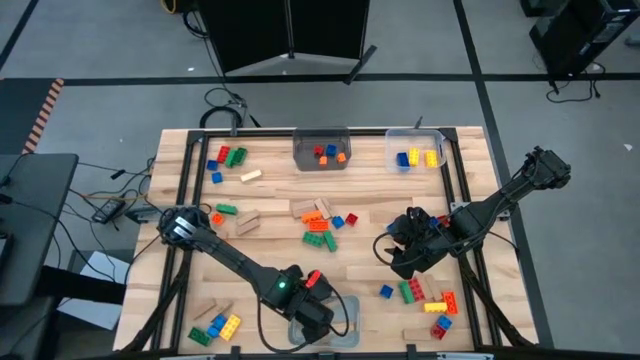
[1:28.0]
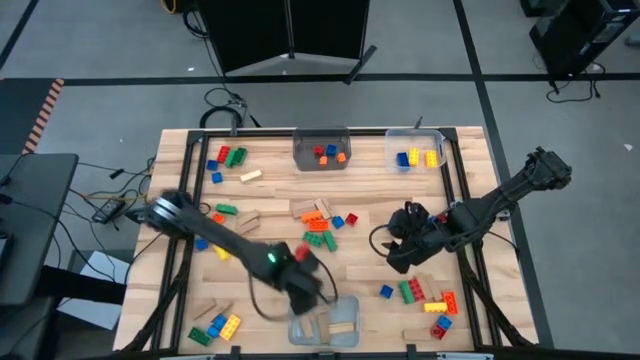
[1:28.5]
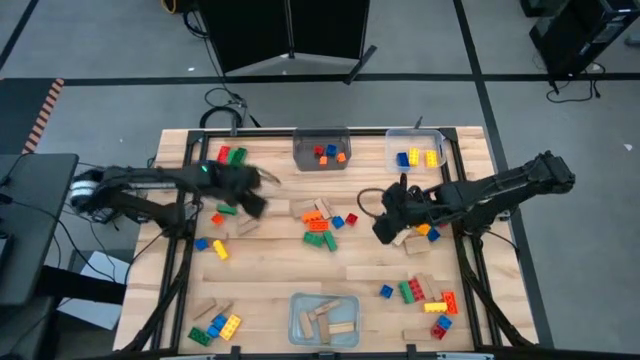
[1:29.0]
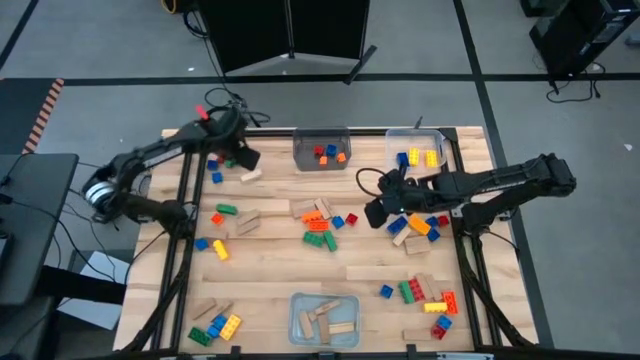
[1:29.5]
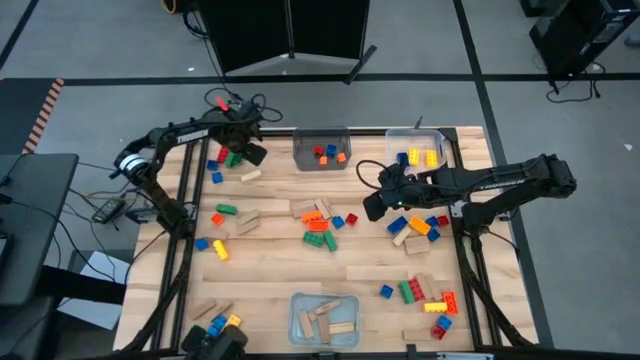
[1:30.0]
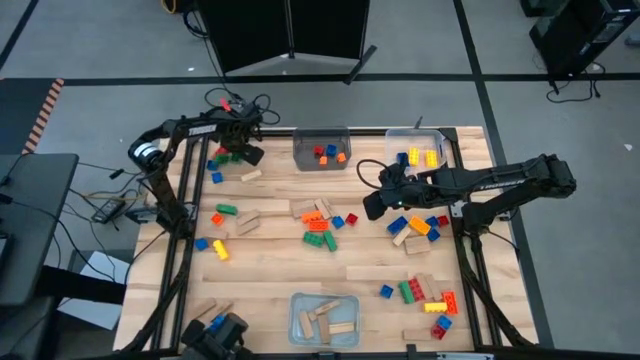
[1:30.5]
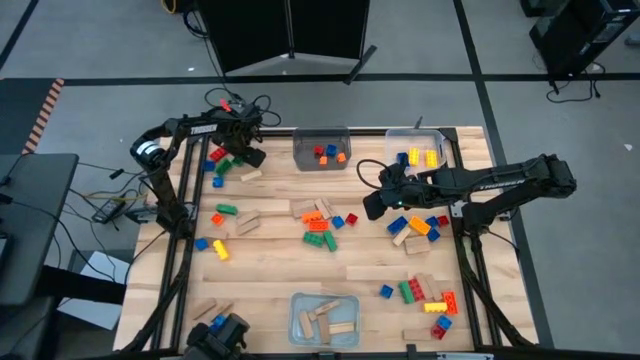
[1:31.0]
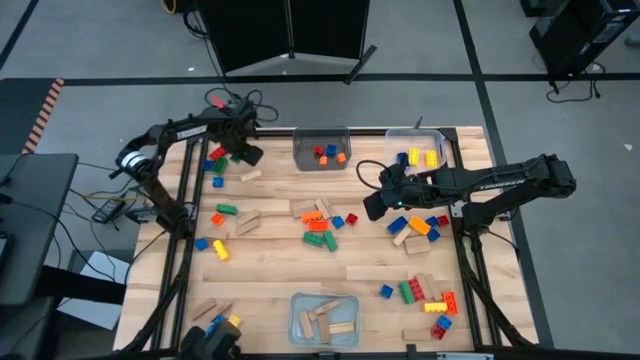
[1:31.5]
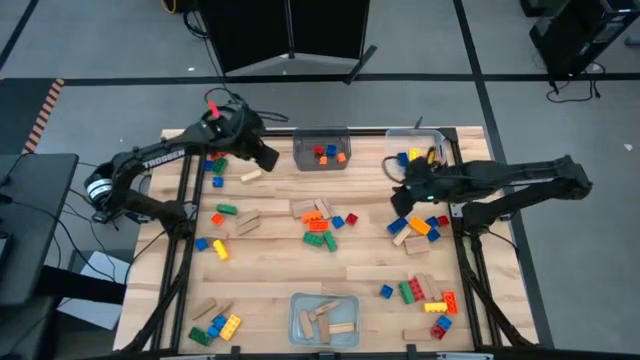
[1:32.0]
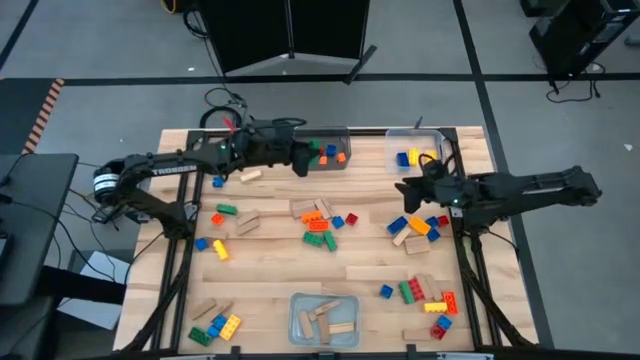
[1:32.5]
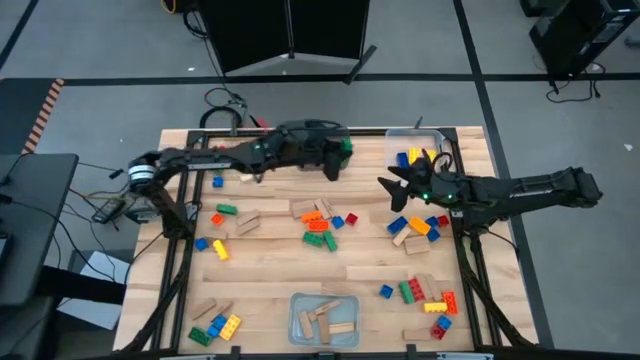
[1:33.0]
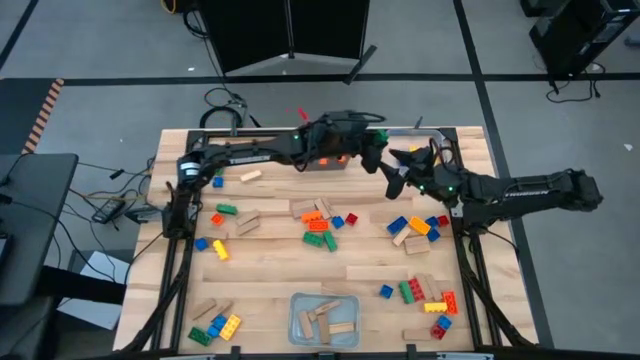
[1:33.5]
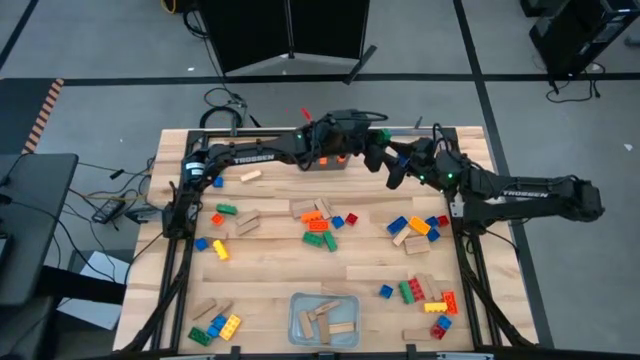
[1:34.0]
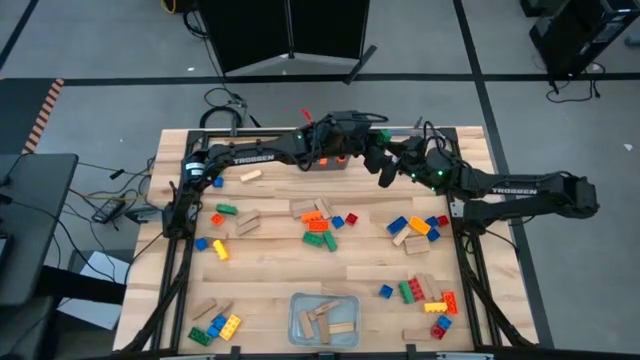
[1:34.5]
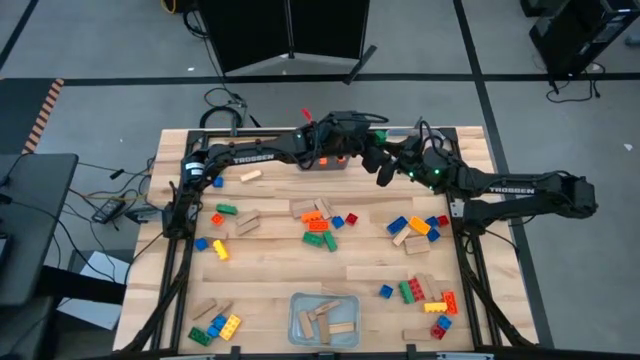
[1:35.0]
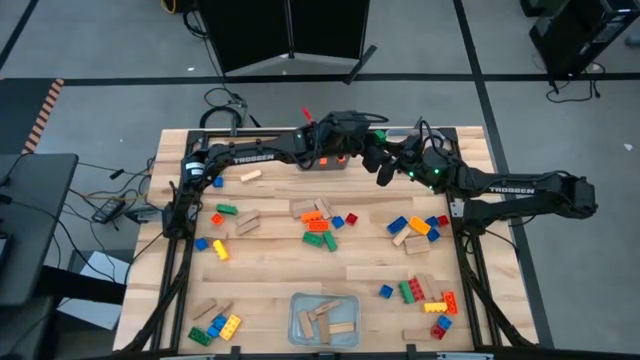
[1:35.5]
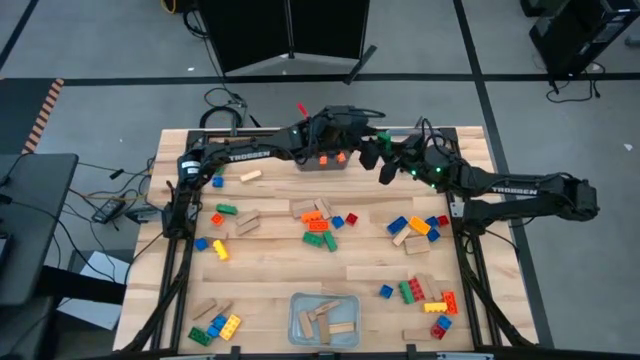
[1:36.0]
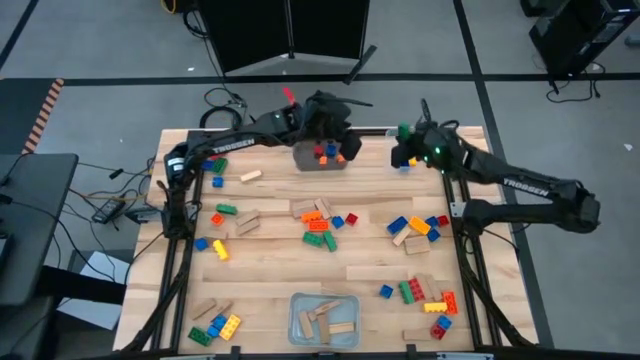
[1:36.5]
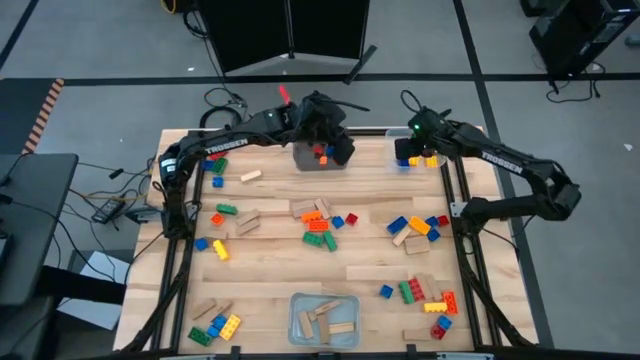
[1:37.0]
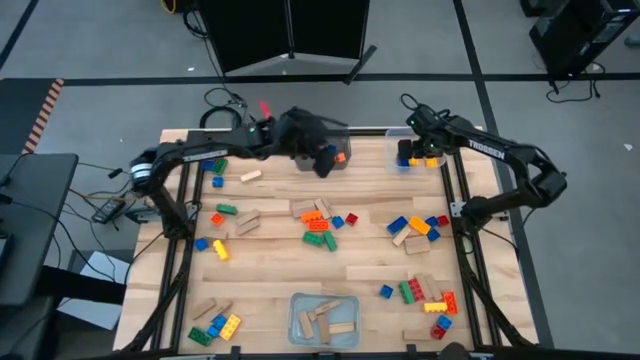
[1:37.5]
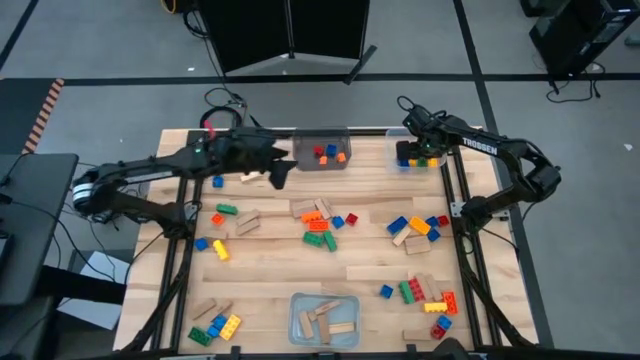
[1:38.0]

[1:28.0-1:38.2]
Task: Sort blocks by size
Put the large green game piece into the transparent bin

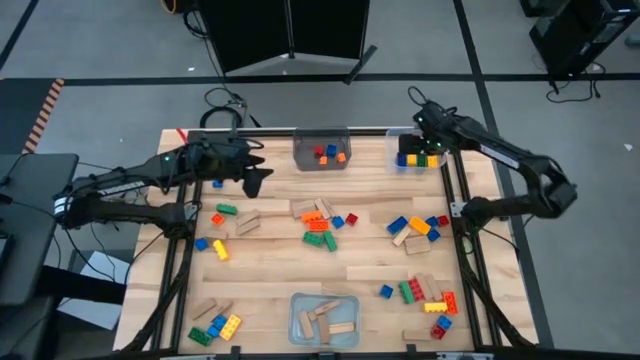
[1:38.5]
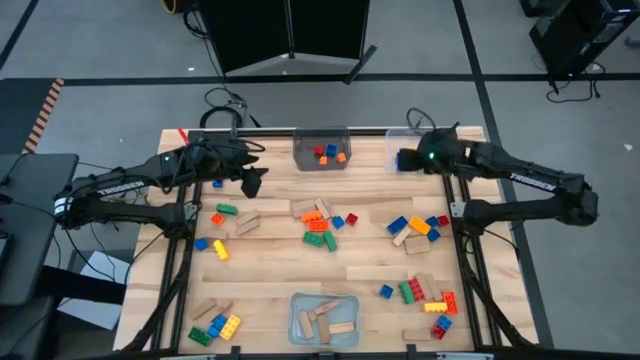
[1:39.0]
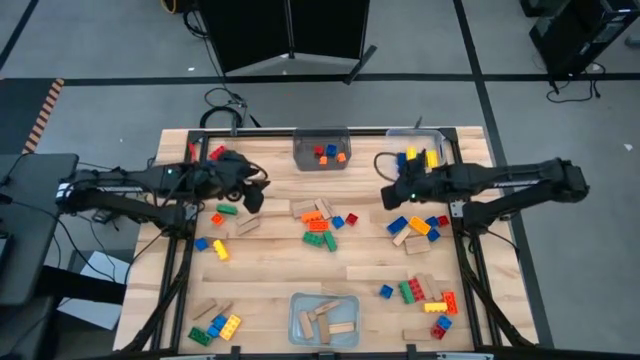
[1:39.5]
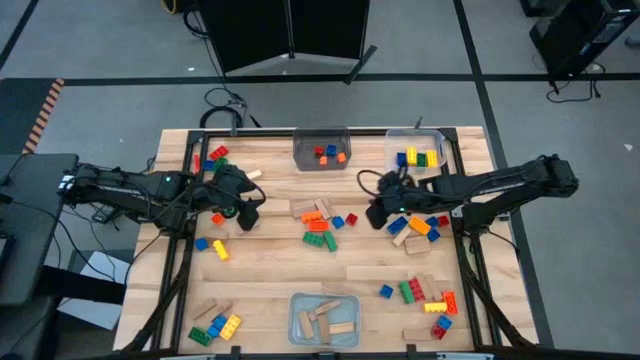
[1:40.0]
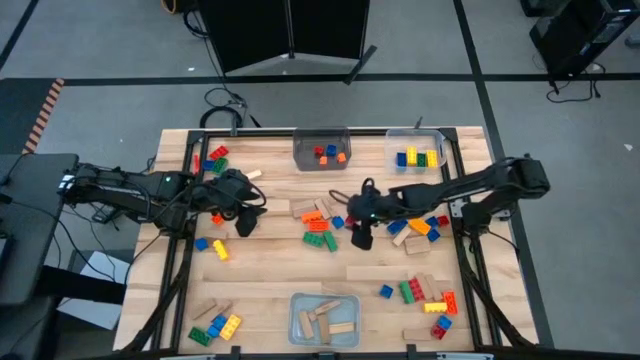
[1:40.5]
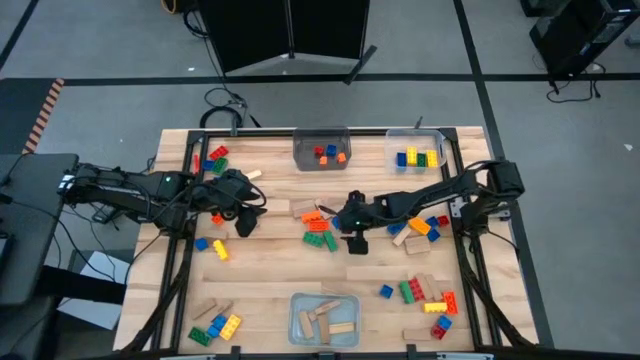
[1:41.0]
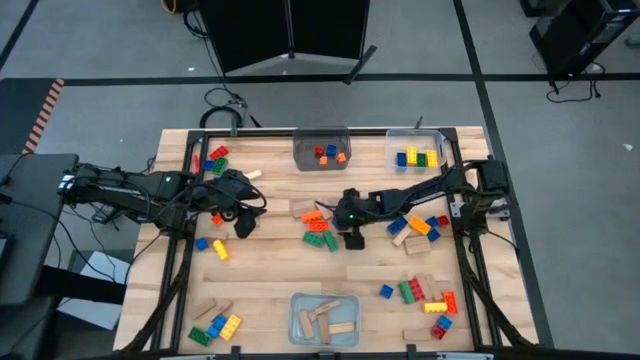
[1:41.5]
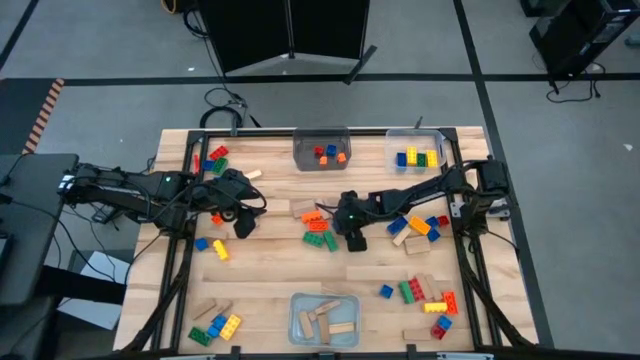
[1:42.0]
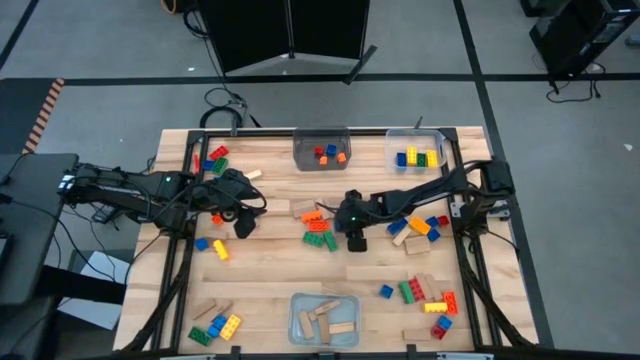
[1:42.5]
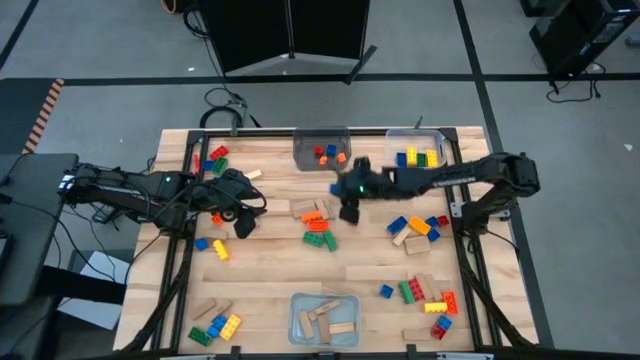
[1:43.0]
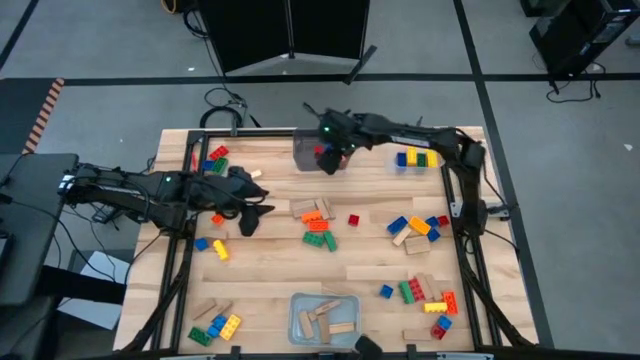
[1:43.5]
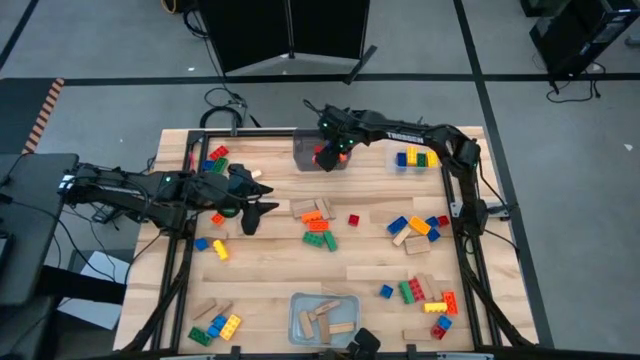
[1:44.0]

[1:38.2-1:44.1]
Put the small blue game piece into the black bin

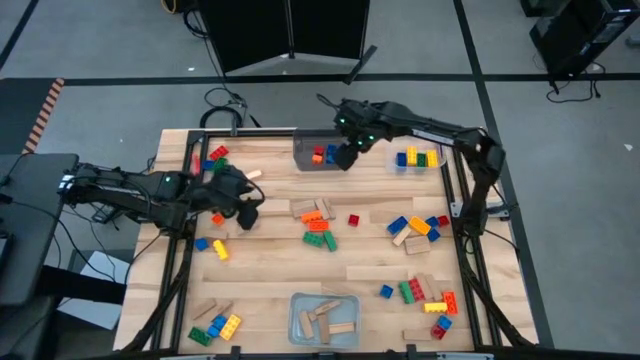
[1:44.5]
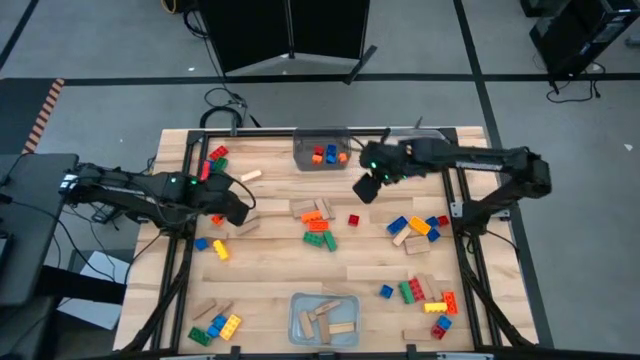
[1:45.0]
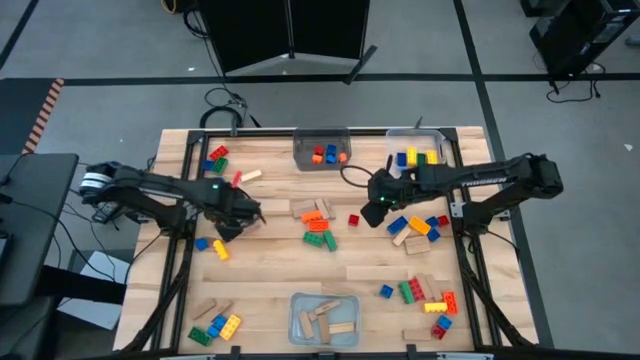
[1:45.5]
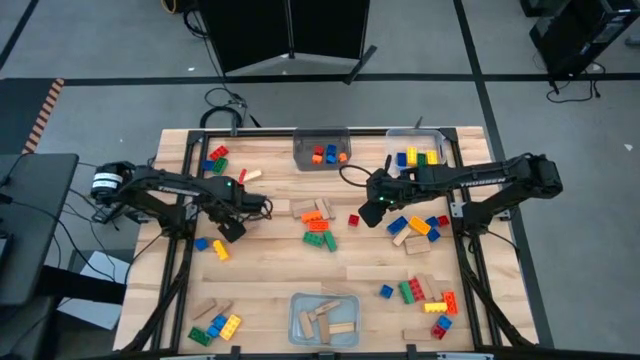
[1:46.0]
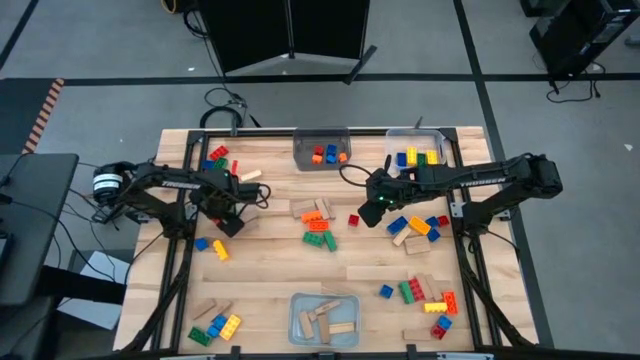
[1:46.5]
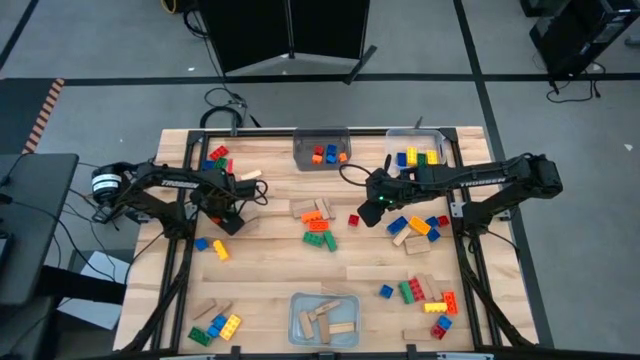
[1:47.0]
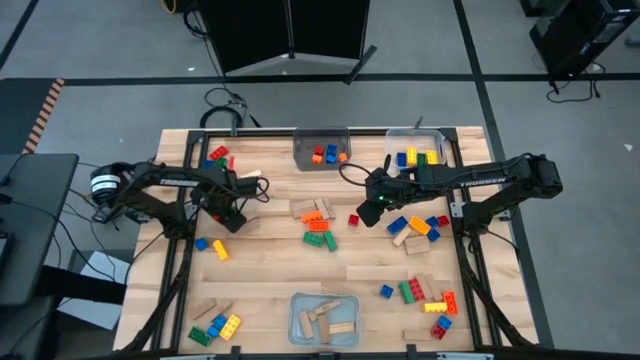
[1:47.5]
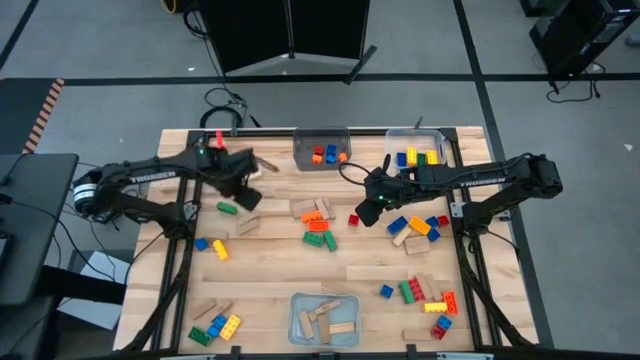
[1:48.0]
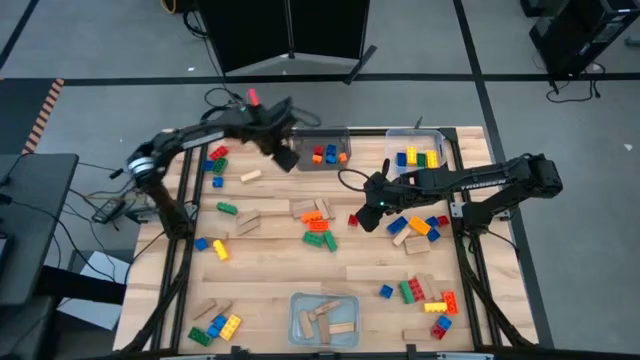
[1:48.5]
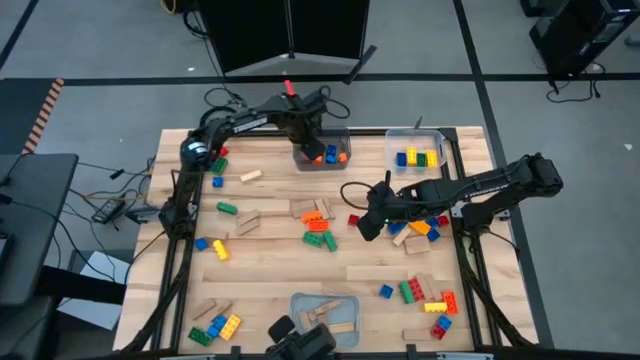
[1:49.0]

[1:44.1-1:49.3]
Put the small orange game piece into the black bin
